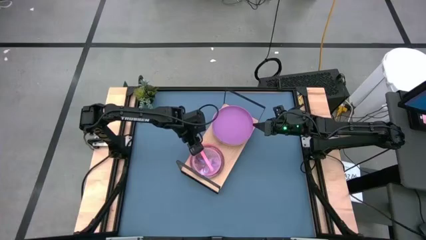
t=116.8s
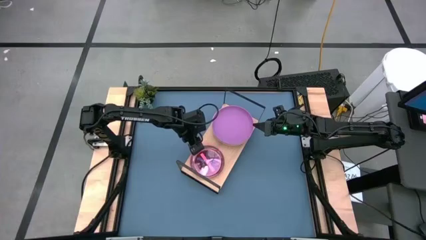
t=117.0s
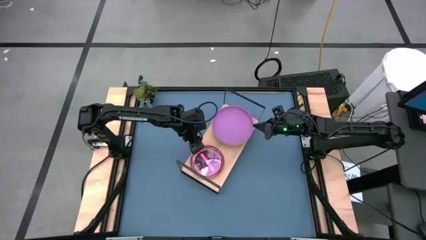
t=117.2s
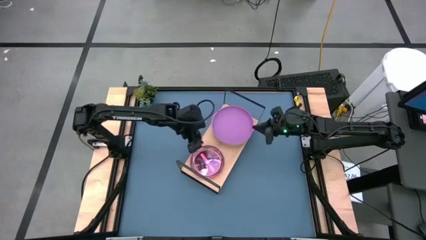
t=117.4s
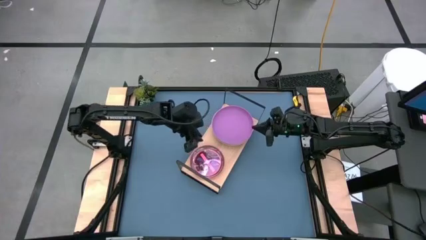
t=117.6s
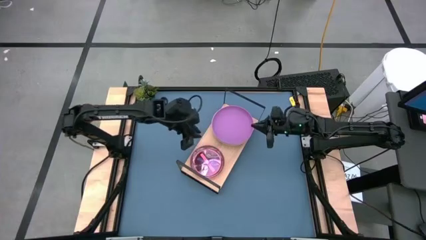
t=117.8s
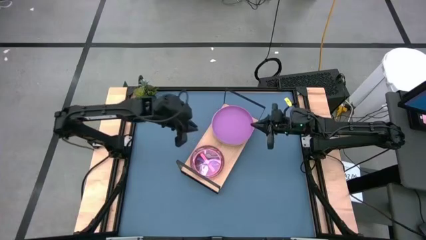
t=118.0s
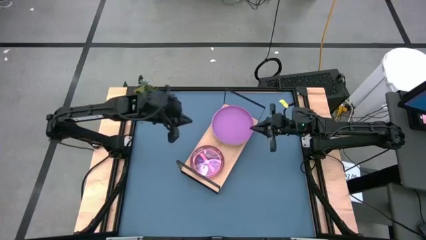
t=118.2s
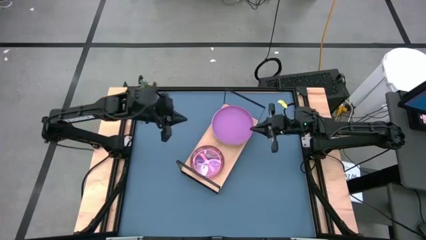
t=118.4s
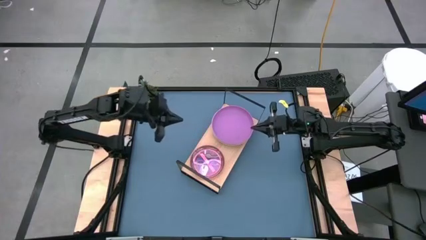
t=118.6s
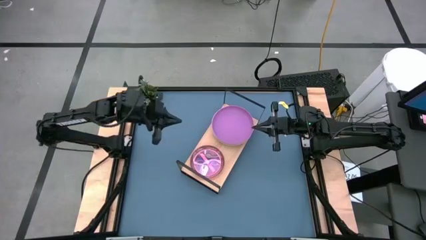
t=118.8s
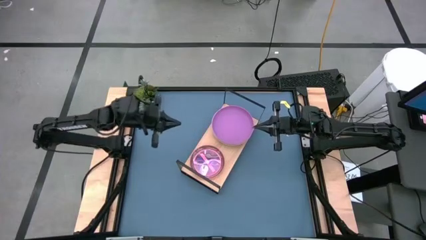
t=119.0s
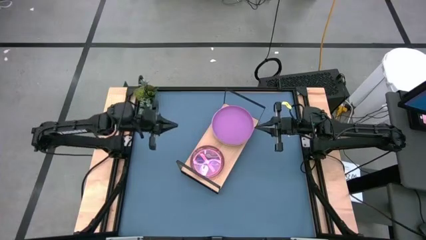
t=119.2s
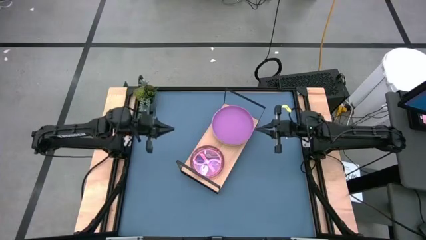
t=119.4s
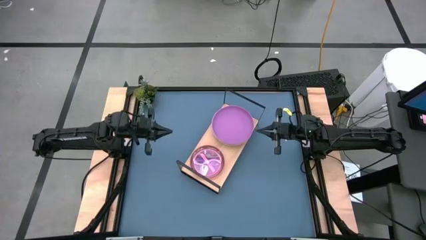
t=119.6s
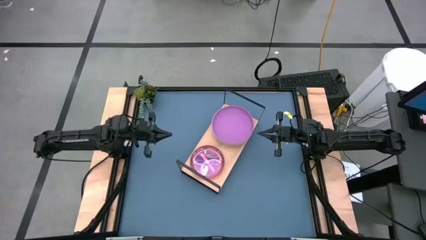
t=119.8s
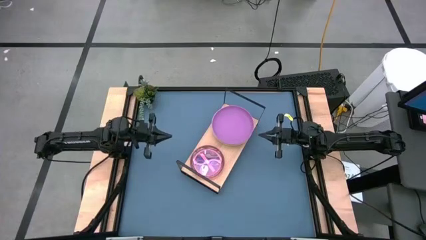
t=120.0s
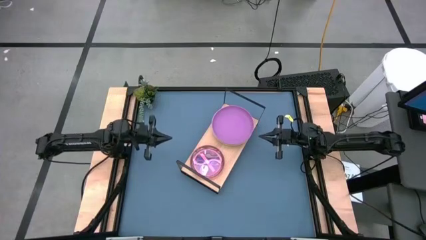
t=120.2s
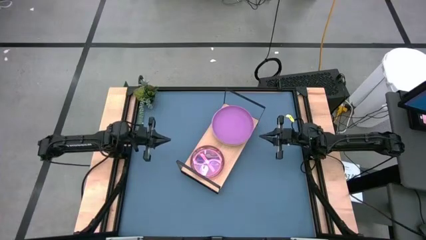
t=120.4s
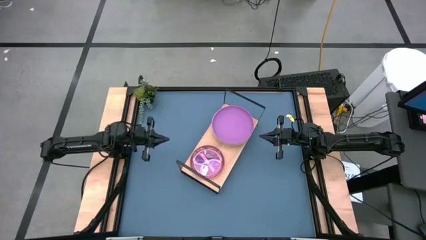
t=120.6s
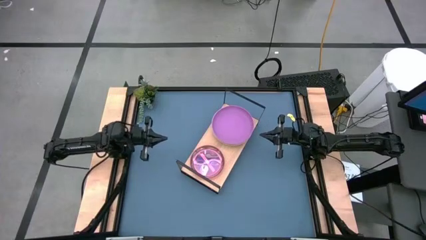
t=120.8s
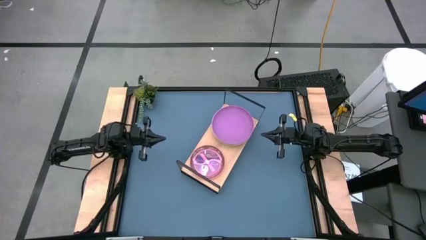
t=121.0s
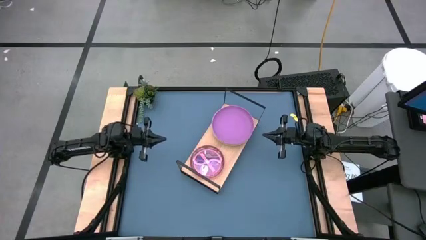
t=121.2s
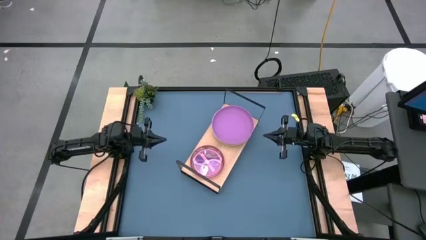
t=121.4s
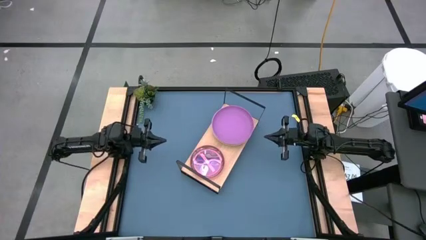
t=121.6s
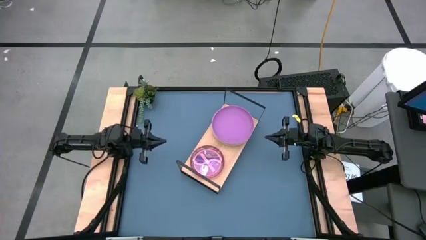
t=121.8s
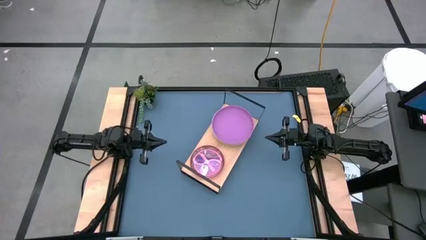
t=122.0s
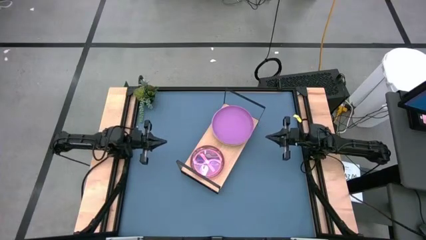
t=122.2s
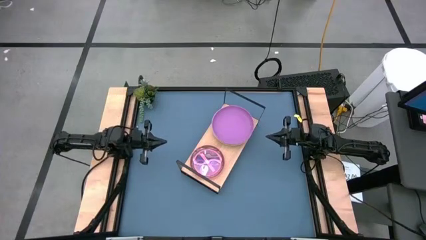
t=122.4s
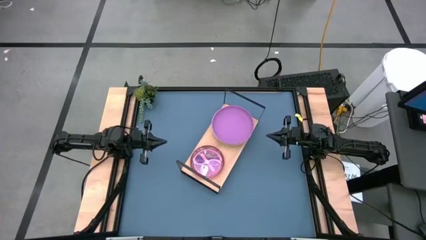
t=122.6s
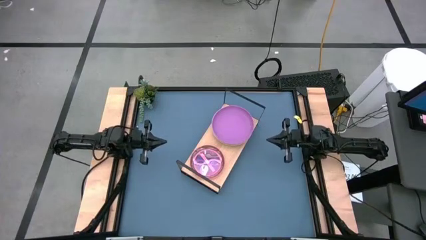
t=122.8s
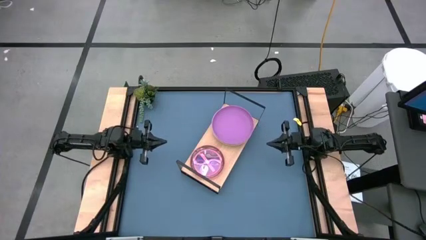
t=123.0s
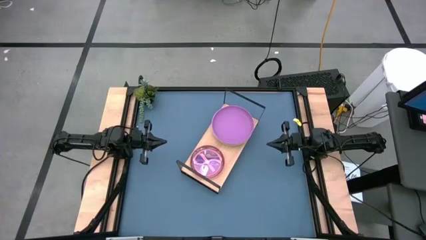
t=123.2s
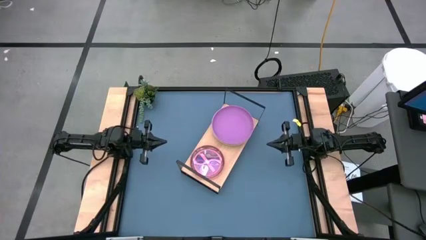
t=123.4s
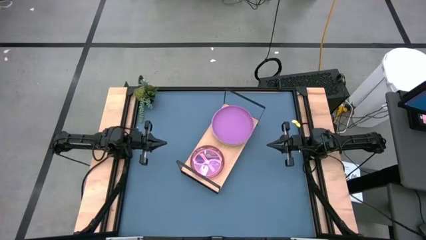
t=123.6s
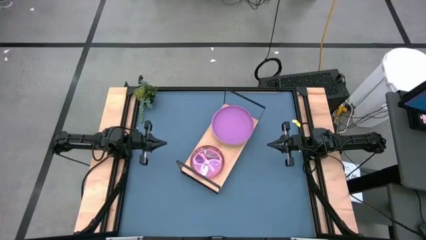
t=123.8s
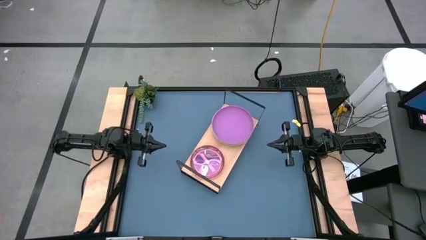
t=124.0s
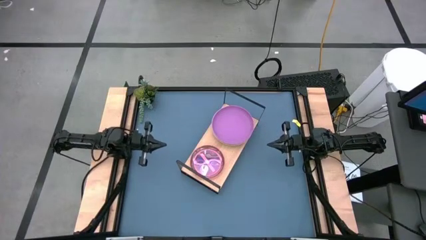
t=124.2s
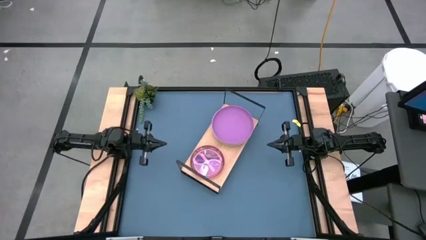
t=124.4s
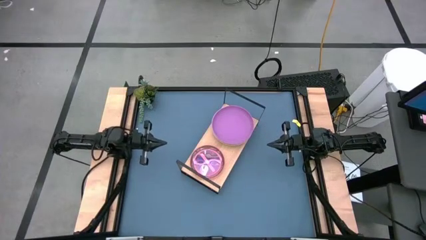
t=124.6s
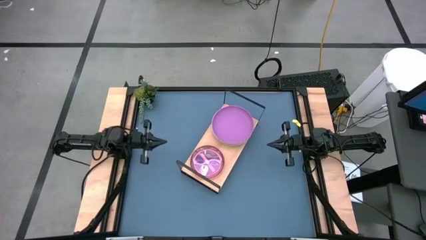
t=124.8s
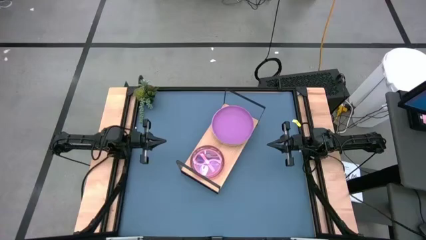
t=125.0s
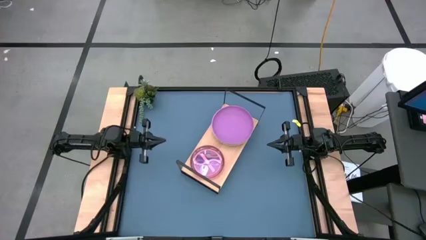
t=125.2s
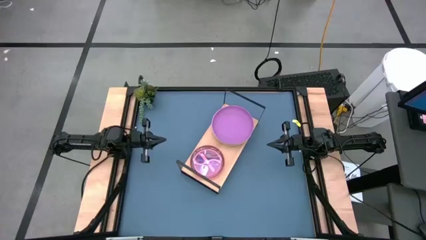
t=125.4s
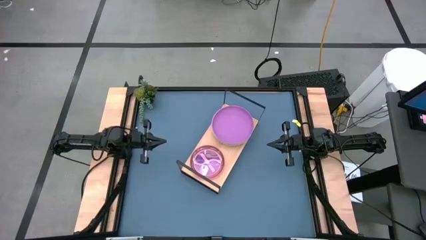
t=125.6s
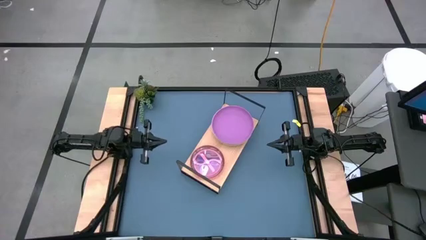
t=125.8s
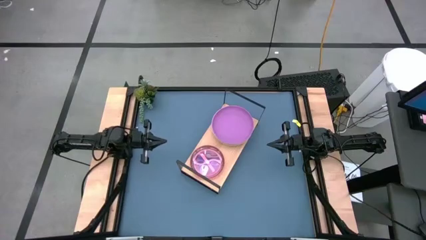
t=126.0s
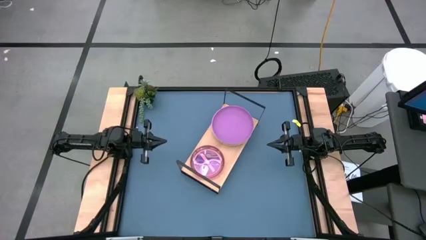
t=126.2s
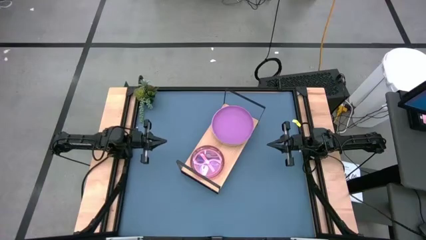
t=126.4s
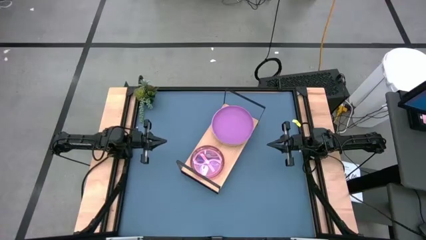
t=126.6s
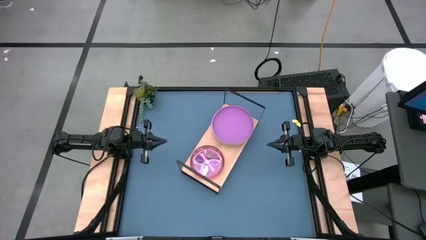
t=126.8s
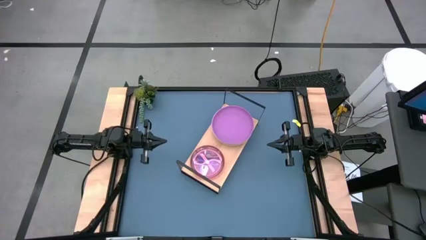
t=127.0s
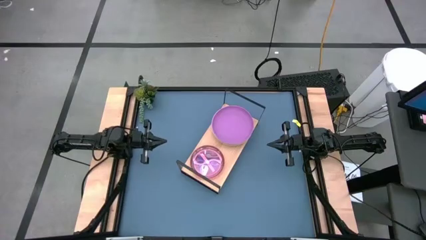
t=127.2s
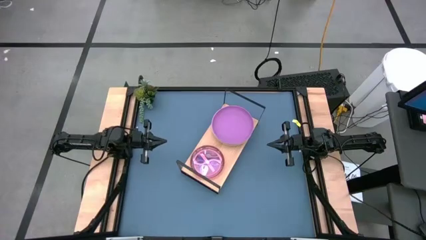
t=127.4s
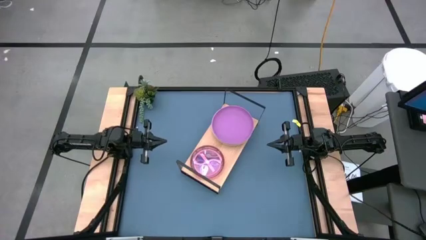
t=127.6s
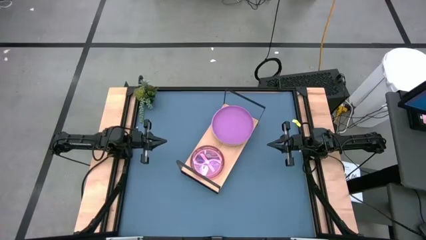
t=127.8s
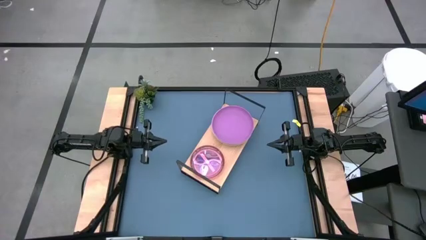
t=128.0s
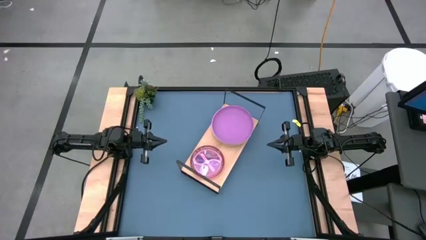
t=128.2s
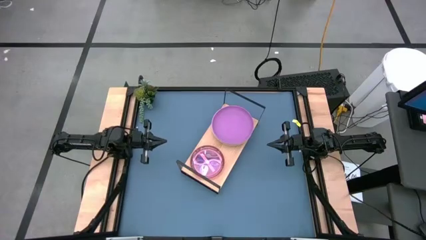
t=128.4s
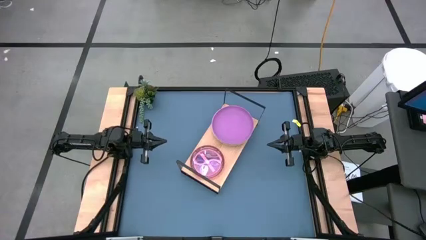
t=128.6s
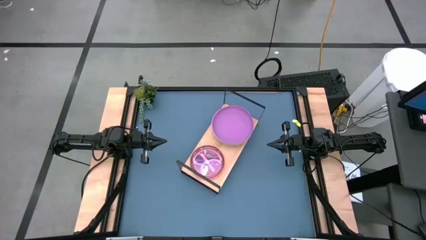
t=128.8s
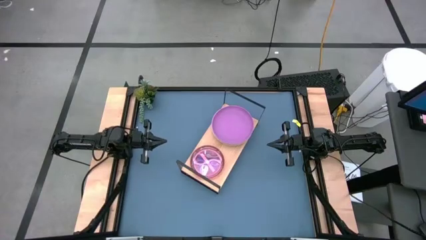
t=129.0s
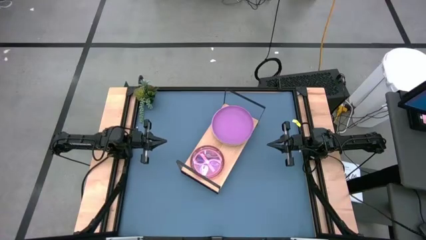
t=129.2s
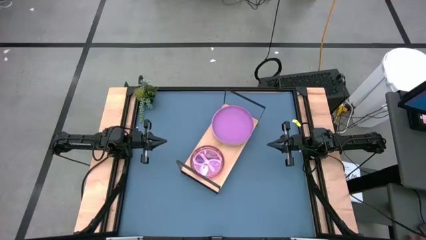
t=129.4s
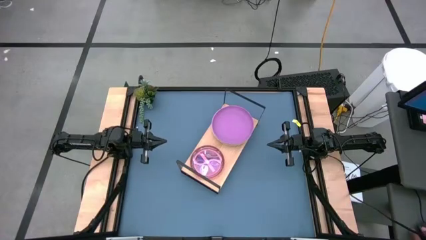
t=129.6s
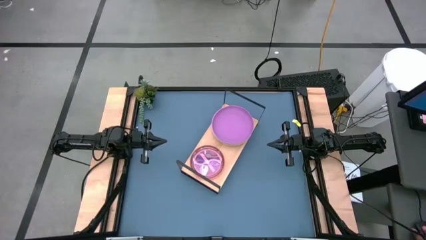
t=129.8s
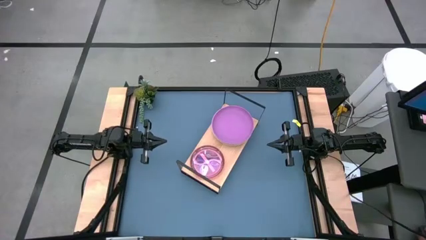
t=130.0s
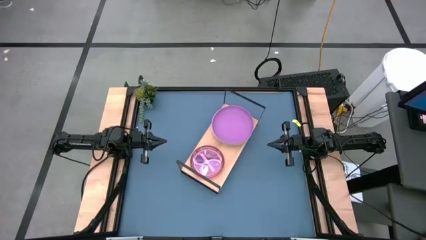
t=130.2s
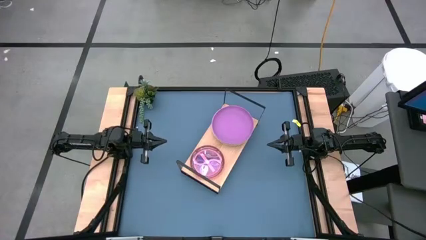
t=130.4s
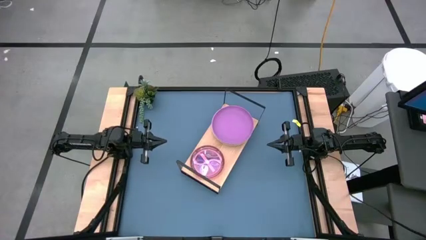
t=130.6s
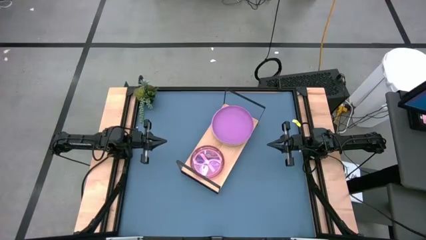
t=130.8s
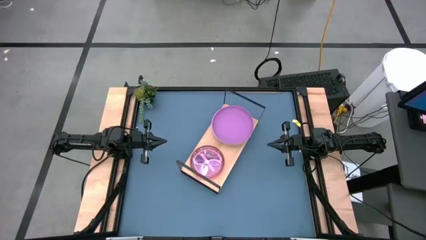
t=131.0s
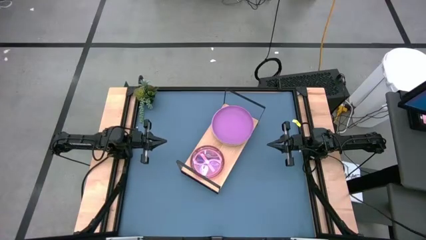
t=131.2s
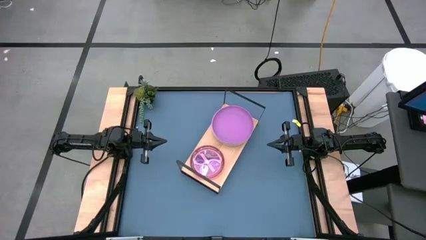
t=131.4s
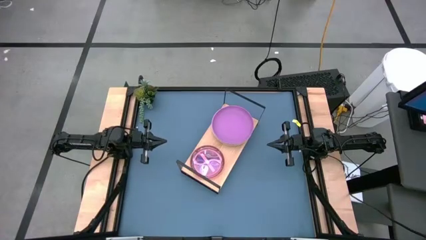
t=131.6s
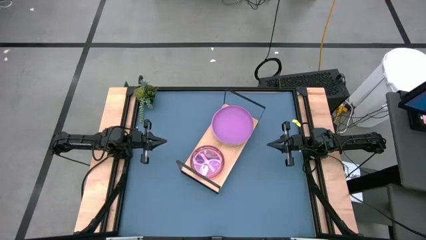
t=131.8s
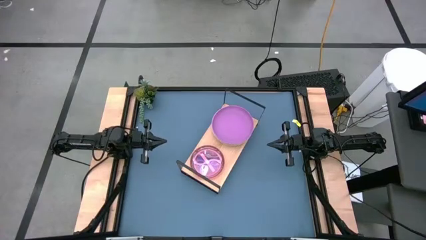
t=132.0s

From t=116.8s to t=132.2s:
Task: Place and stack plates onto a shelf
Return to Home Position
